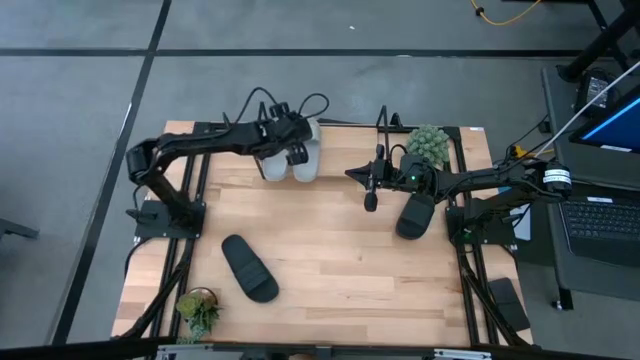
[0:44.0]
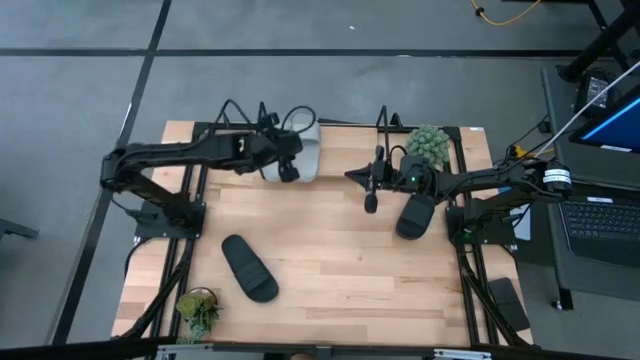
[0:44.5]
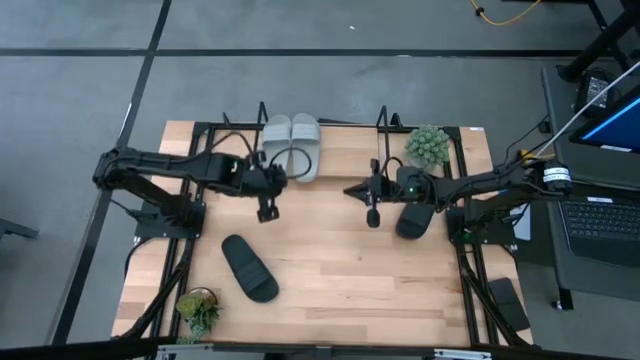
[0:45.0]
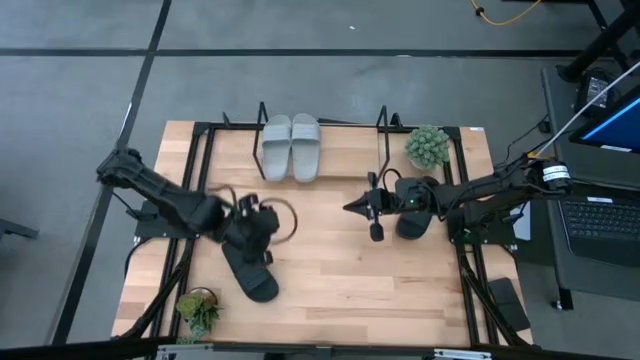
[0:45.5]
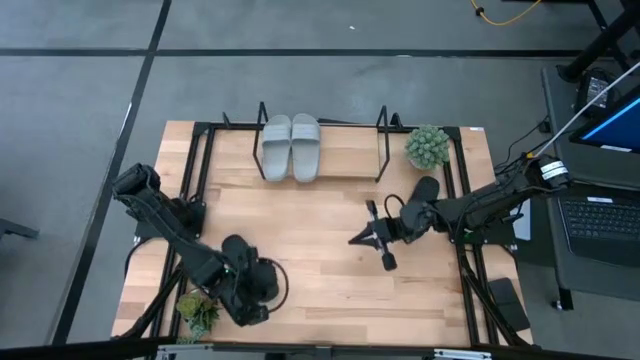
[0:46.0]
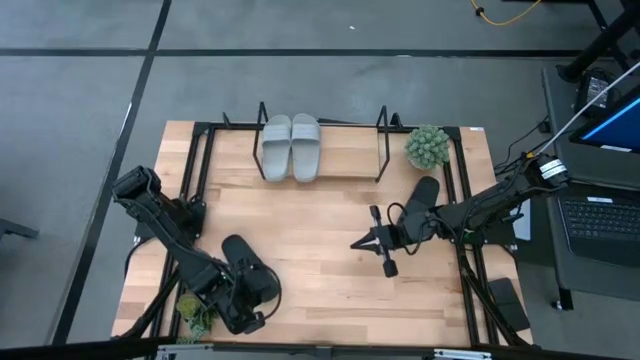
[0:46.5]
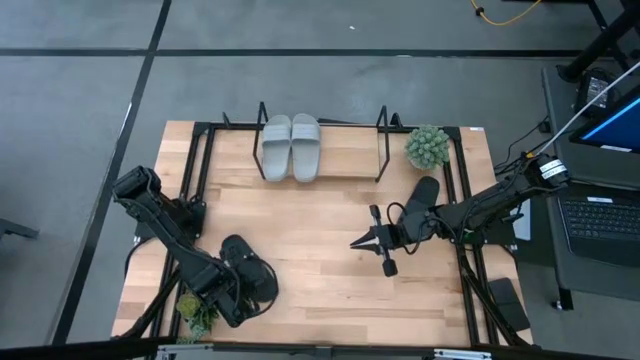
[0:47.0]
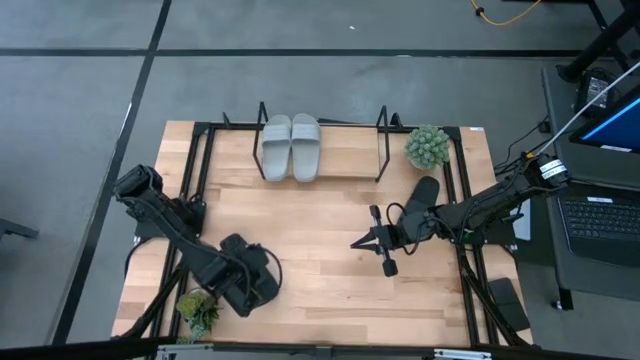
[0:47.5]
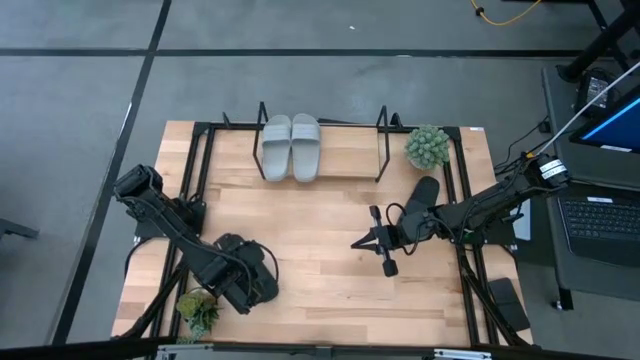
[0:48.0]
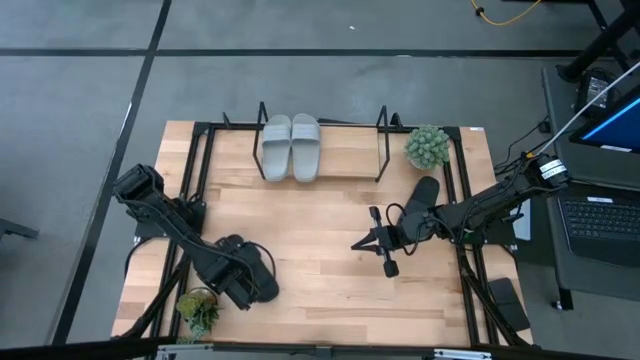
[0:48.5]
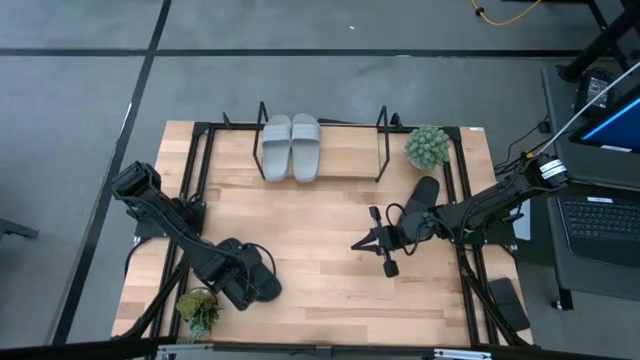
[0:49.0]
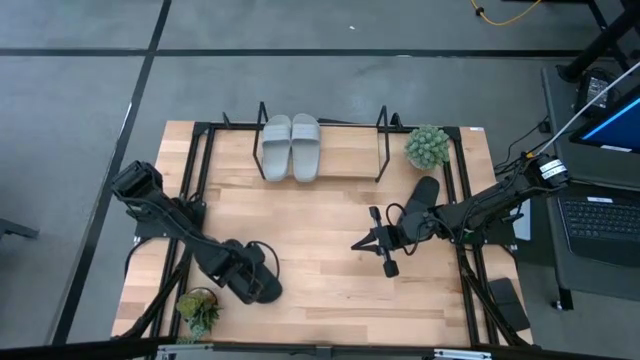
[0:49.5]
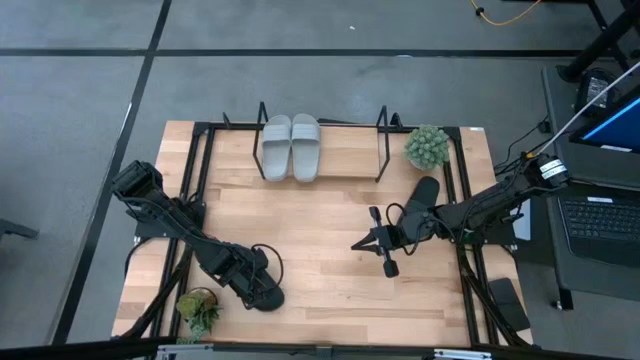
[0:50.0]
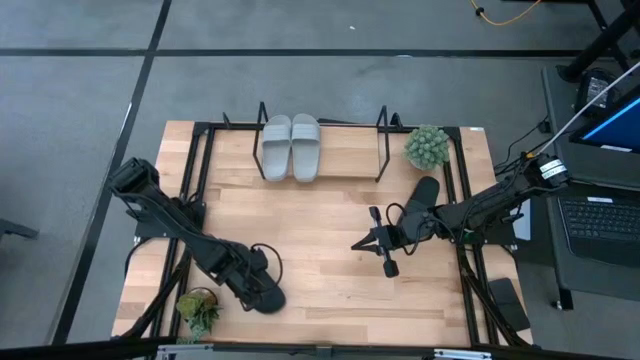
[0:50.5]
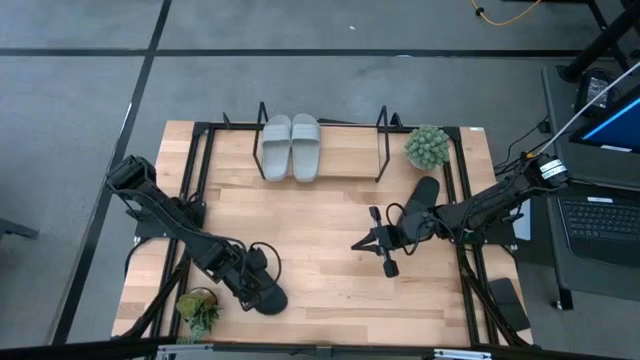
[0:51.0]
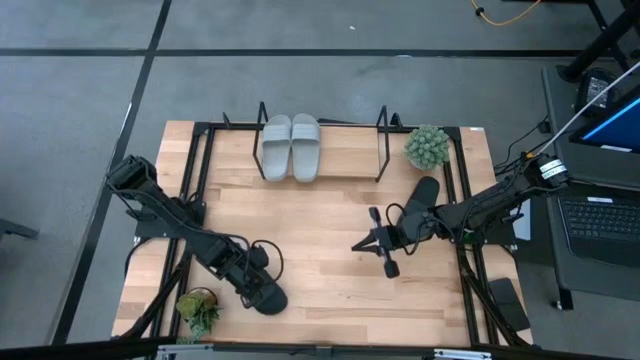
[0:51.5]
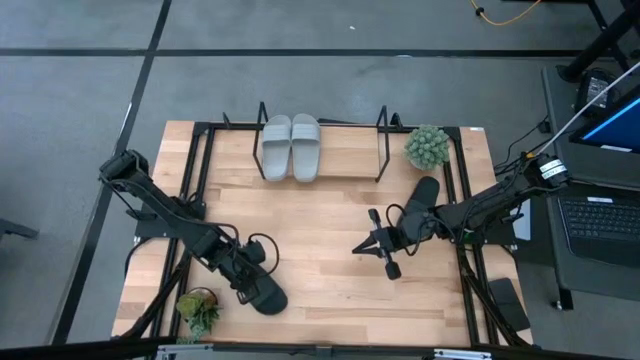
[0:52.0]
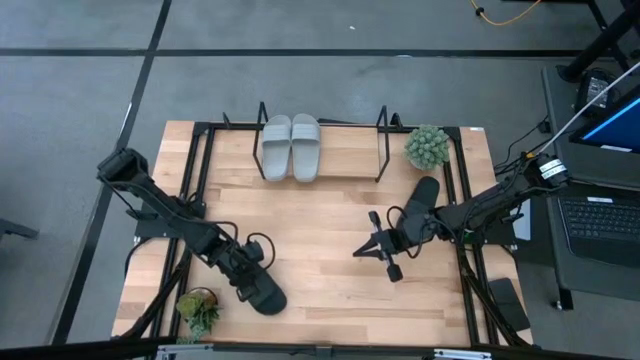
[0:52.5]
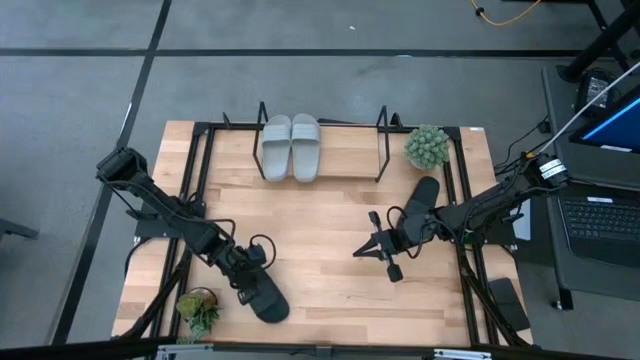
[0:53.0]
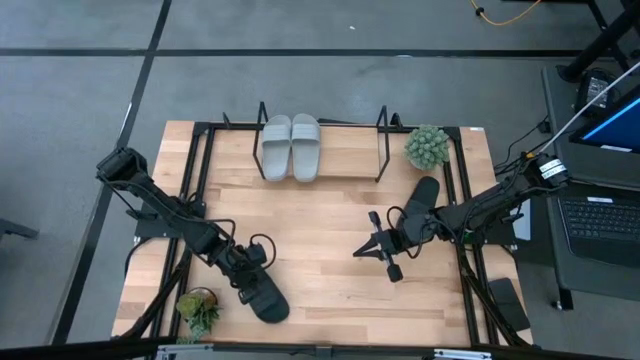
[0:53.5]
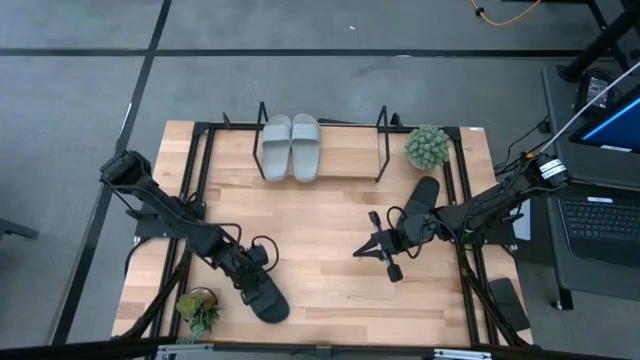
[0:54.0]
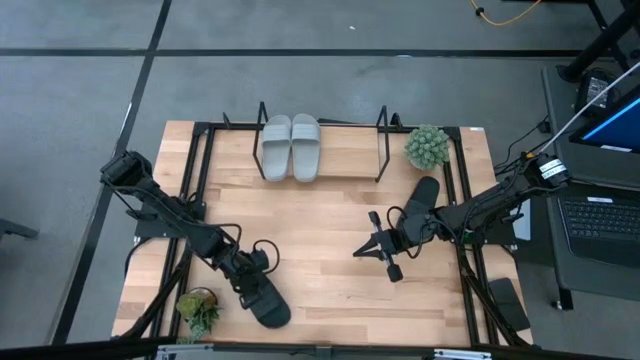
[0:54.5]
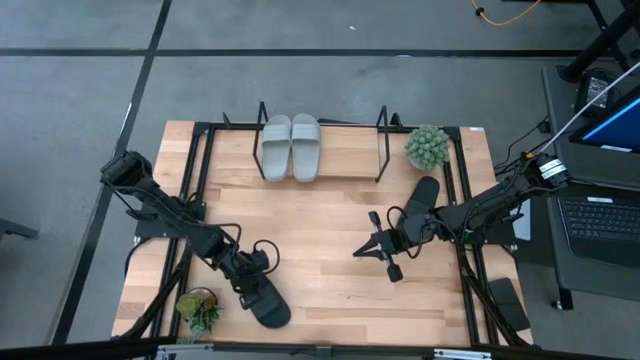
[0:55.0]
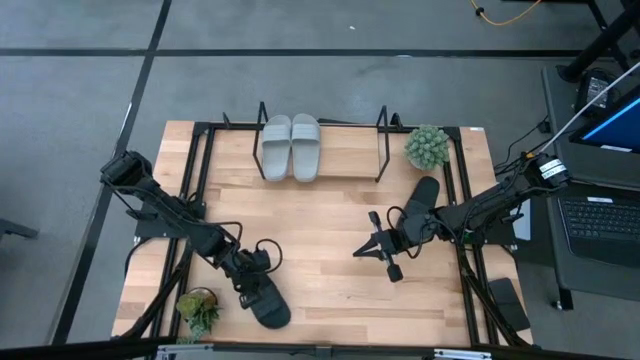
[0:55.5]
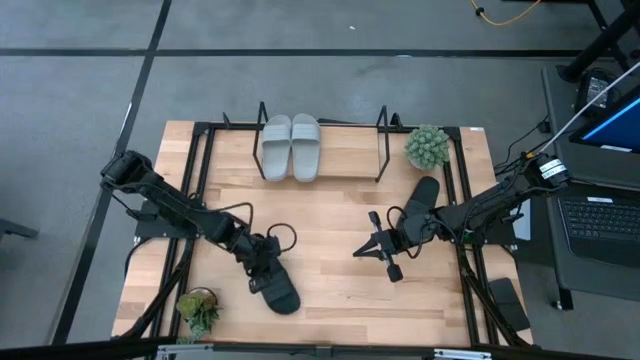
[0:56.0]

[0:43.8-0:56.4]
Task: Pick and place slides into the shelf
Put the left black slide on the shelf

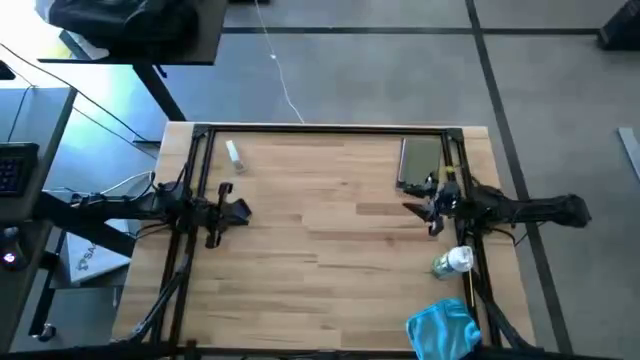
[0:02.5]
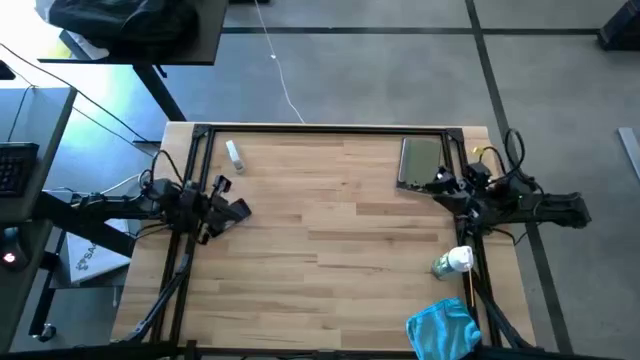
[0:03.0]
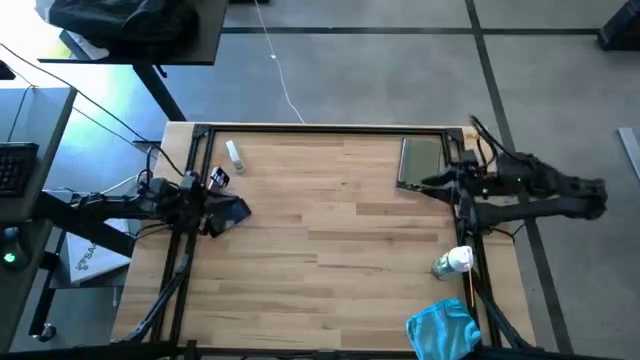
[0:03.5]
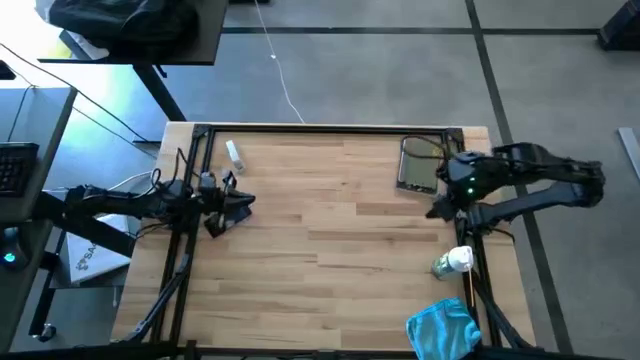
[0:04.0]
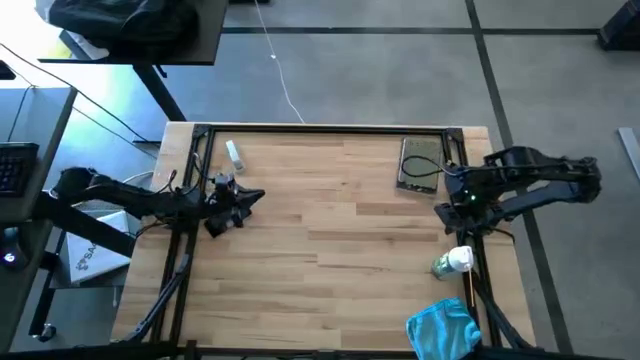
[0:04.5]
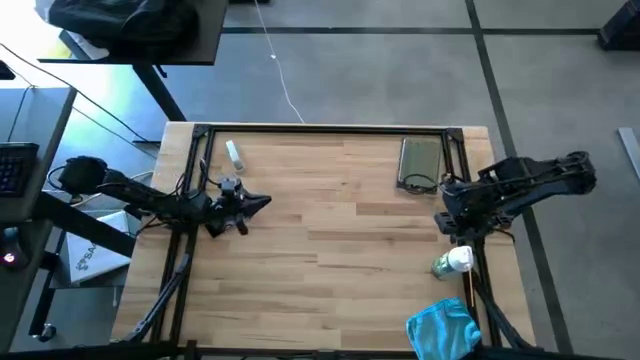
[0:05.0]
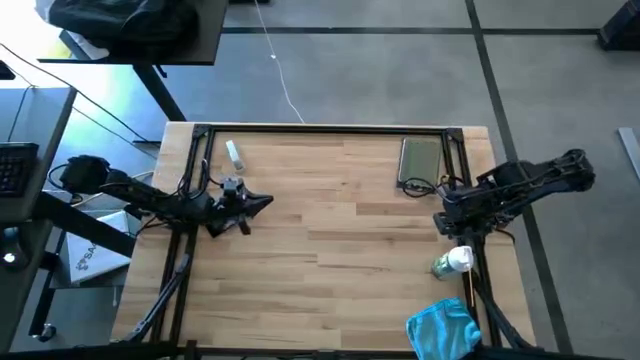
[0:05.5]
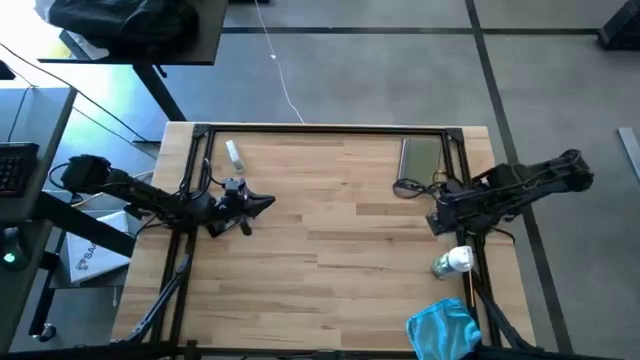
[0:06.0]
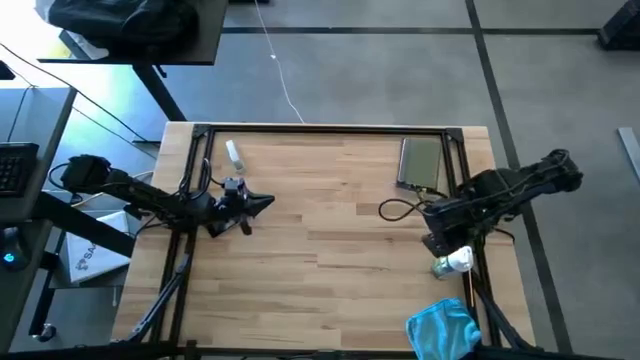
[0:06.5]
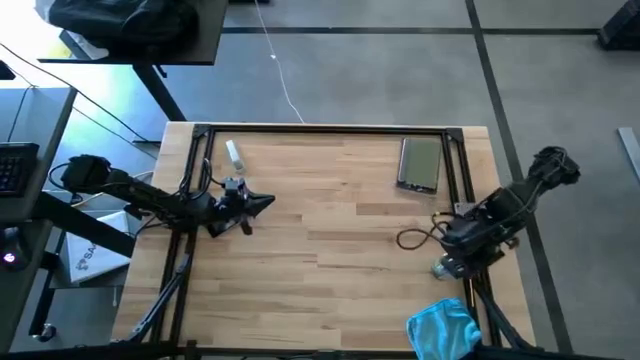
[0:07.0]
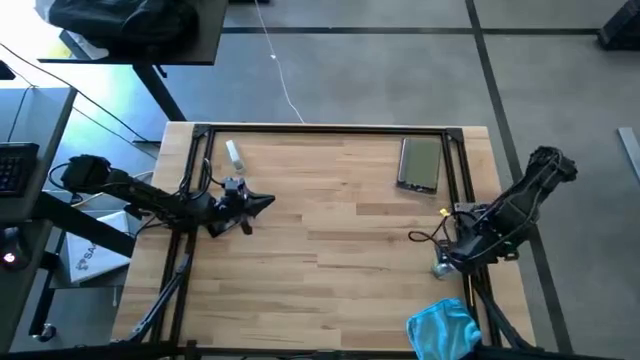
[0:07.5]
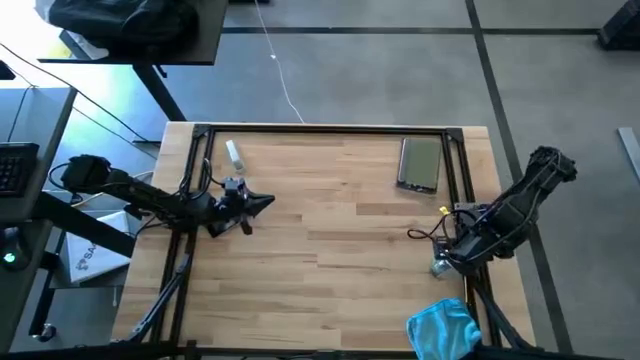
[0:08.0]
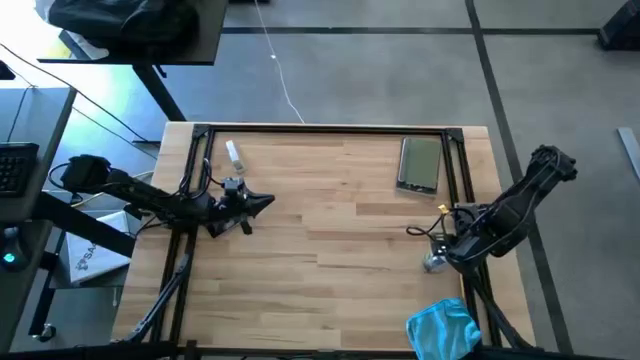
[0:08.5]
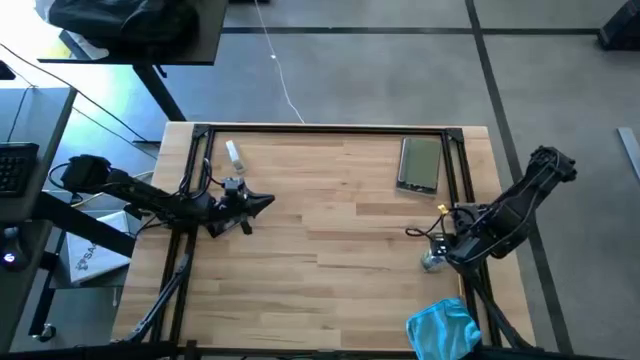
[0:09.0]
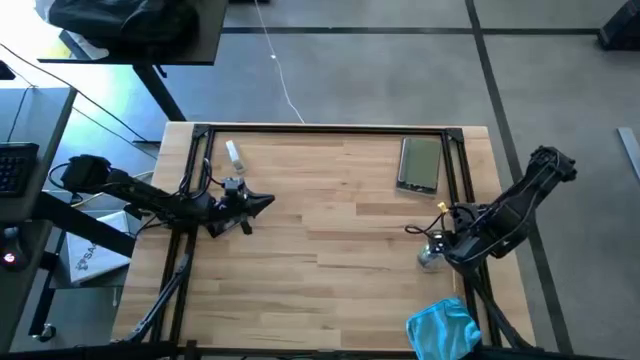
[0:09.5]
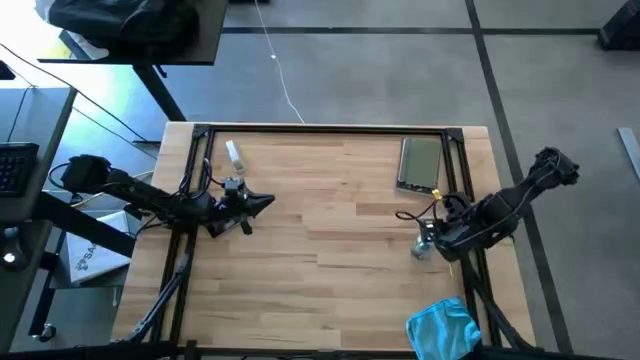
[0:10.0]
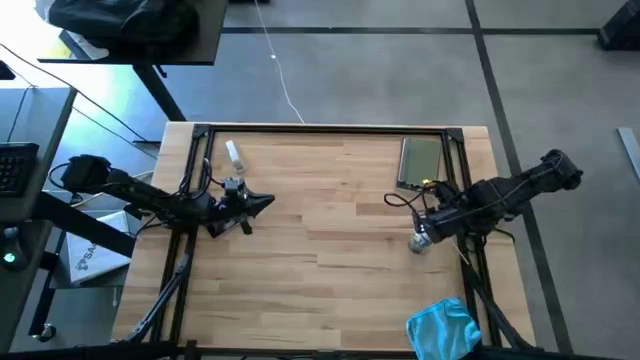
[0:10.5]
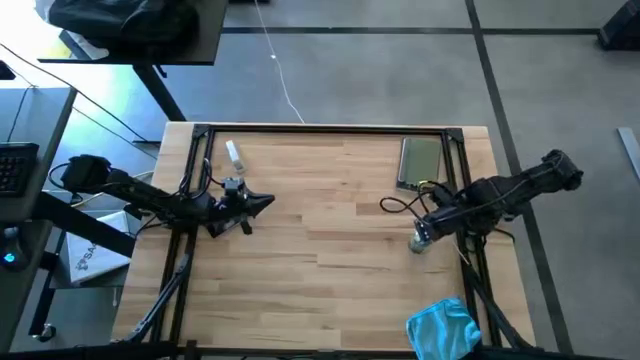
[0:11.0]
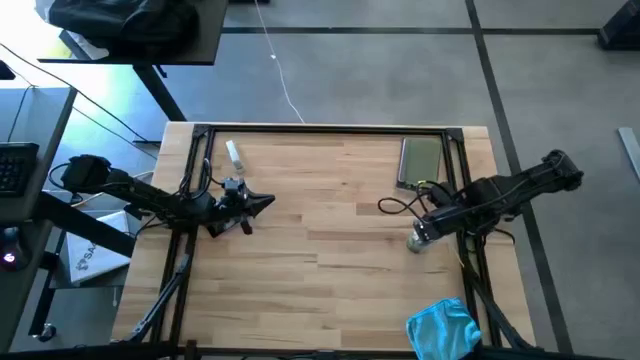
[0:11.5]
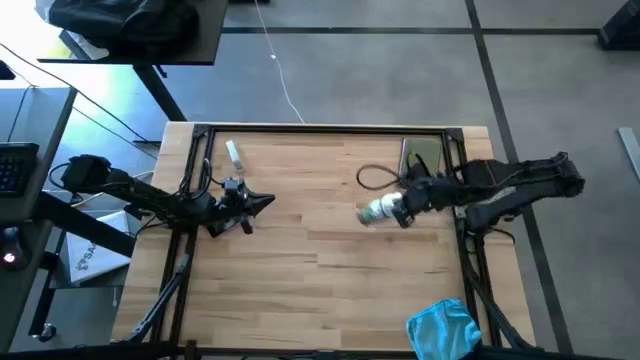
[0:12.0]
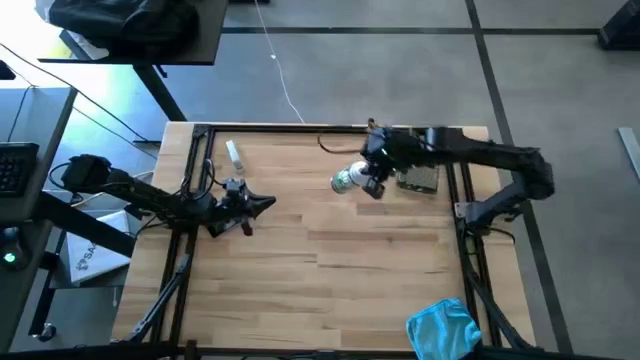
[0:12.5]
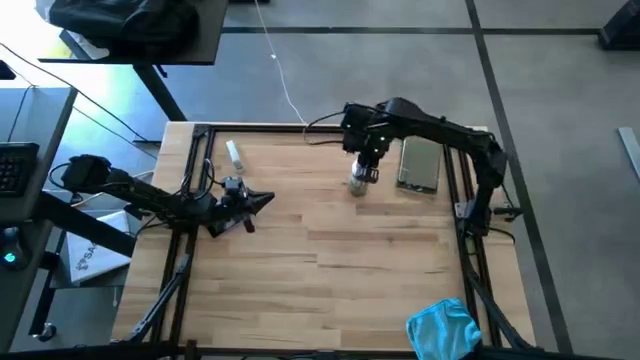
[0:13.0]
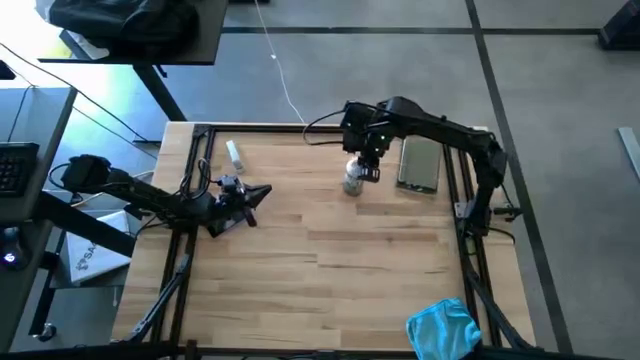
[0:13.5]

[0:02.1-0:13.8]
Task: Apply microfiber cloth
Move the spray cleaning bottle to the top
